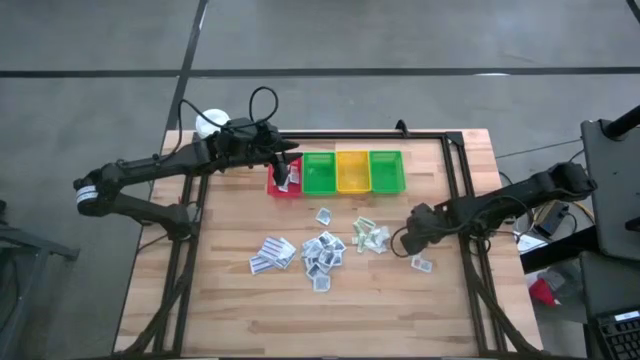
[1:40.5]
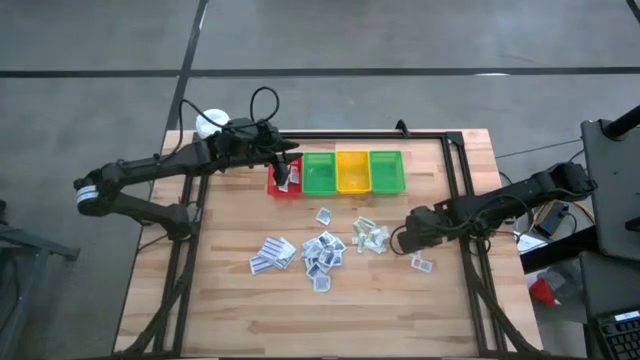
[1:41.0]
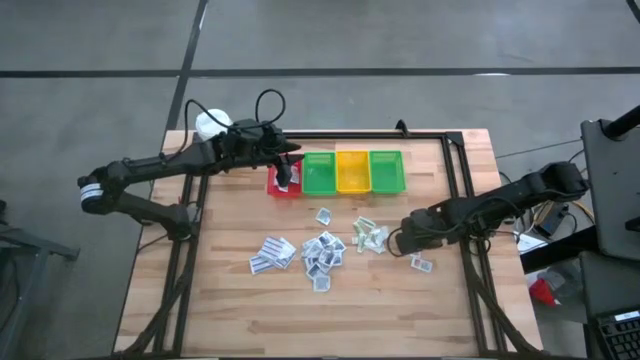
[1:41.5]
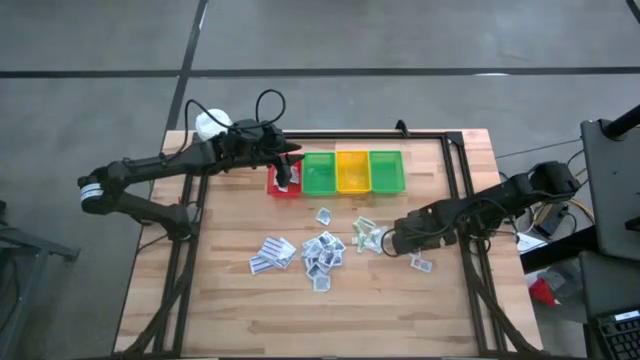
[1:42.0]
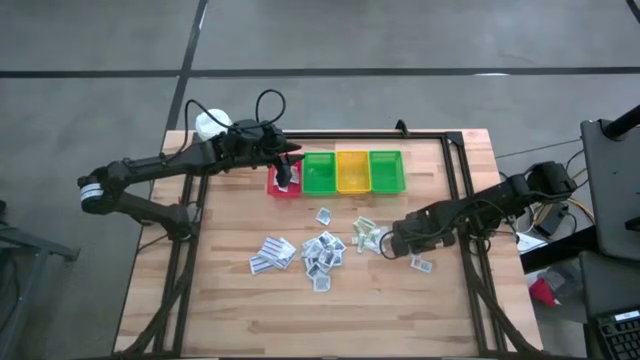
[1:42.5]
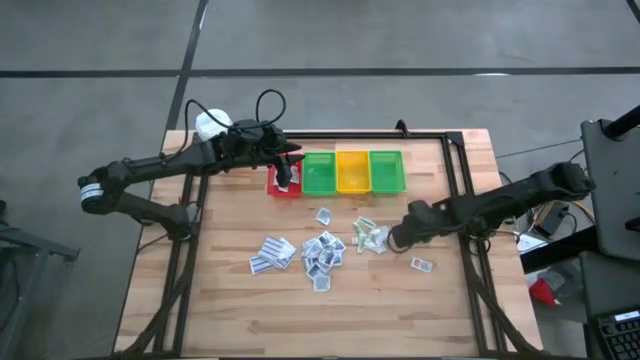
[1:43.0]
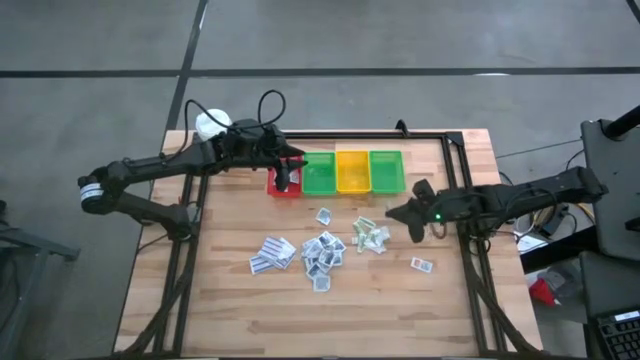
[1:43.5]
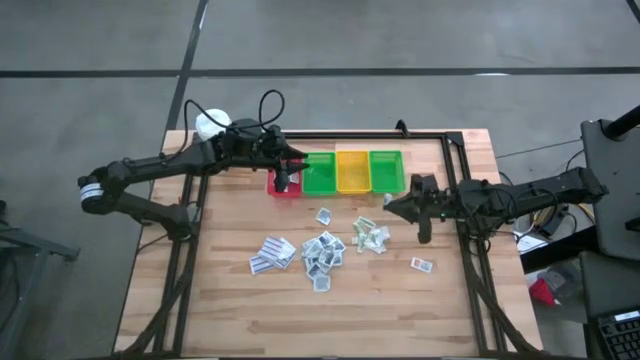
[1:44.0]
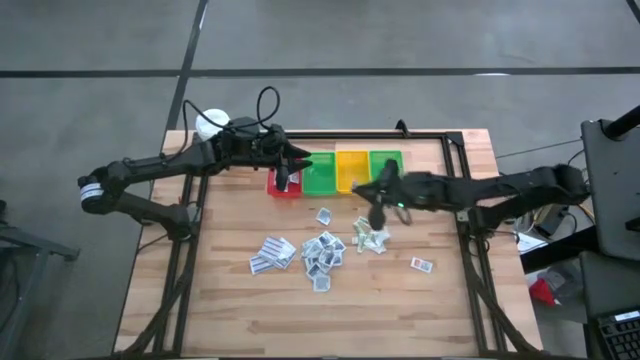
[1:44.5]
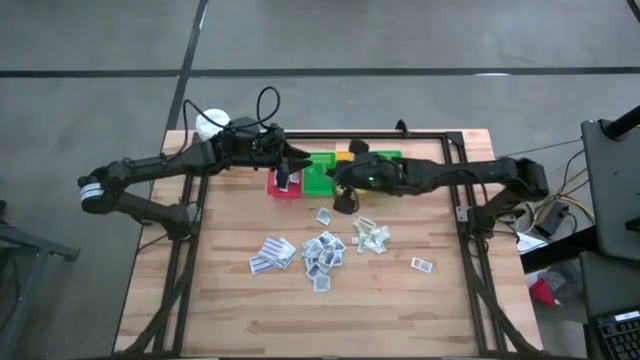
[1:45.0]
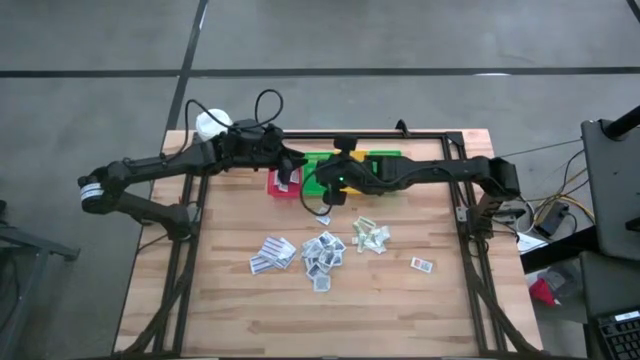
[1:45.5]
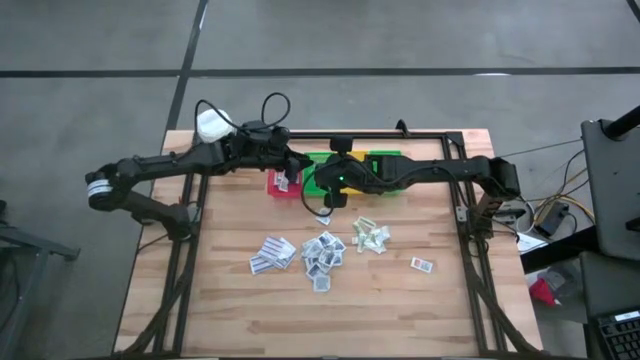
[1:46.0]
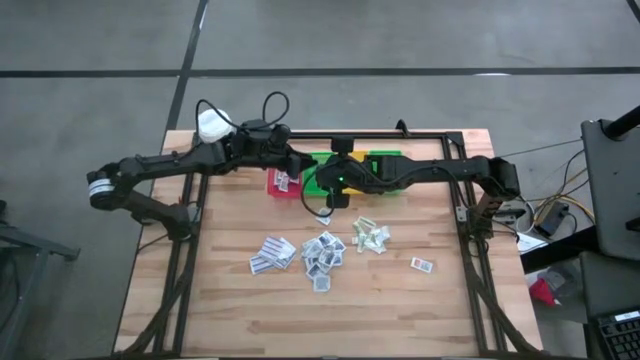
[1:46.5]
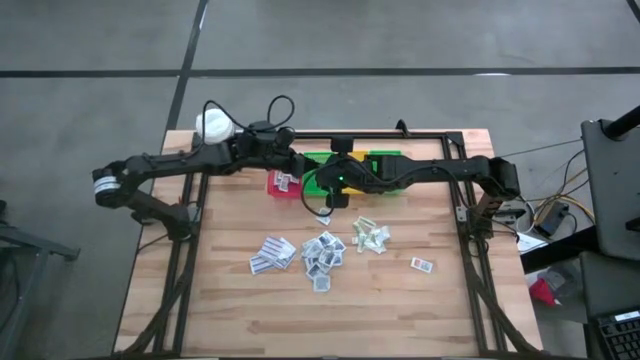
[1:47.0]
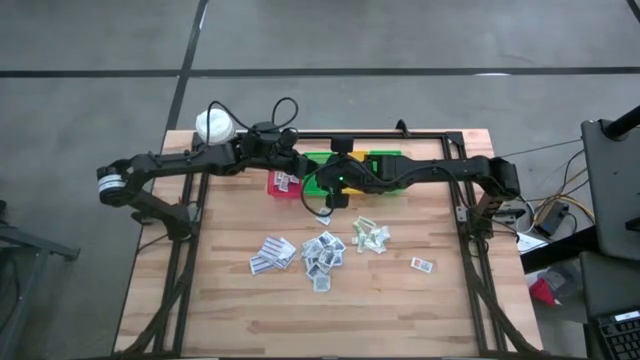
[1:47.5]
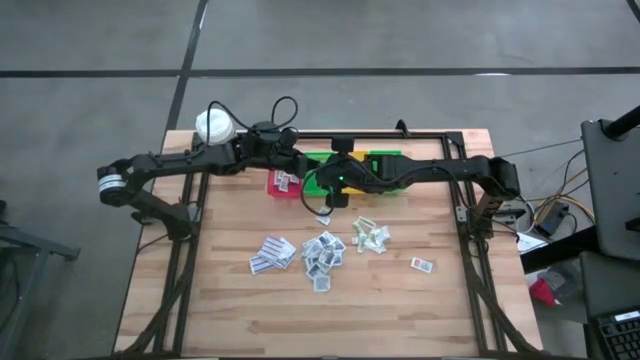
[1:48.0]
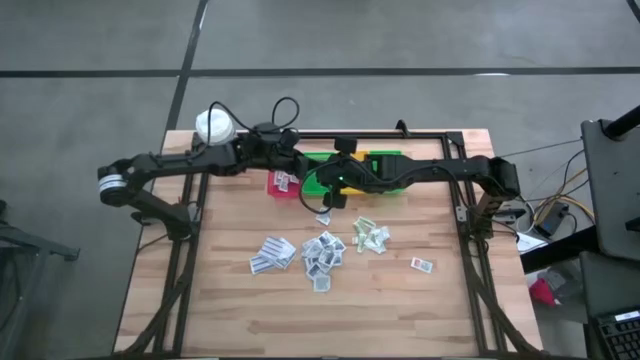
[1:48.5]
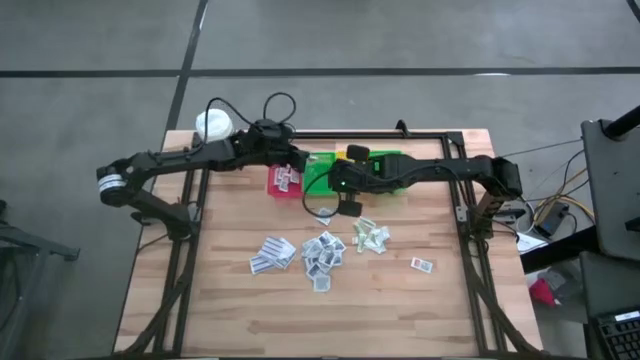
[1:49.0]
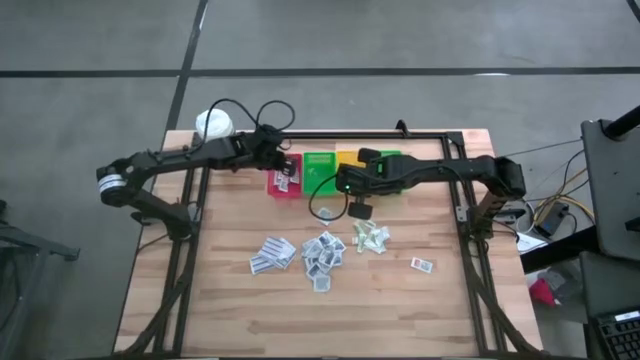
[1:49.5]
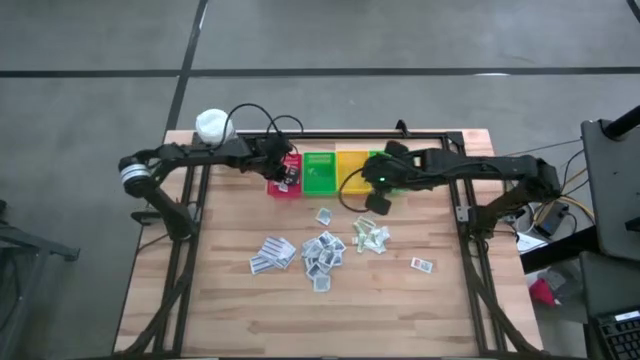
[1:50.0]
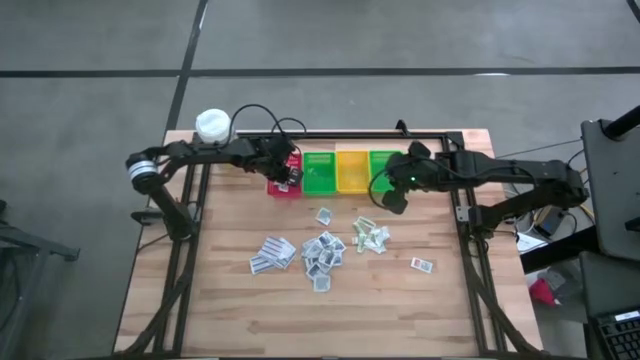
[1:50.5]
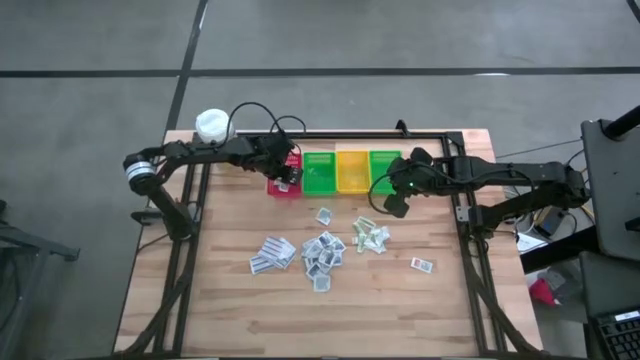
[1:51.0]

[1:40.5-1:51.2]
Task: Pick & Place First Aid Supplies
Put the ointment pack into the red bin

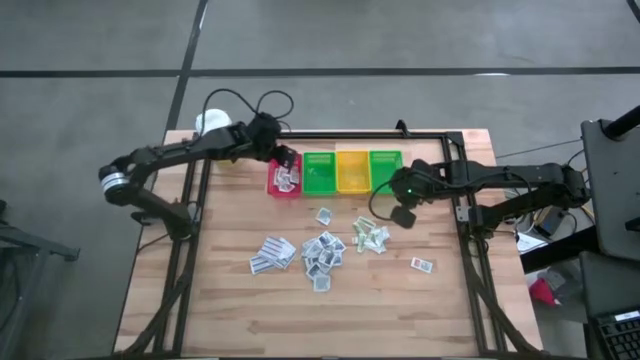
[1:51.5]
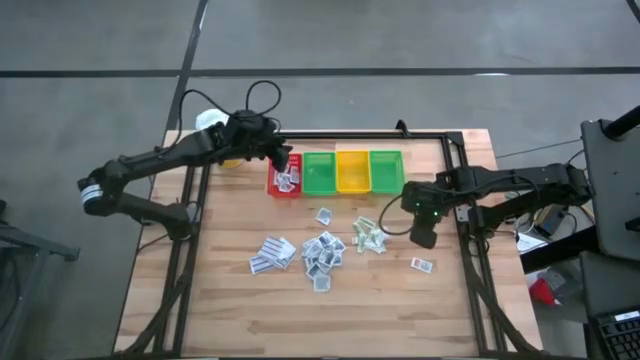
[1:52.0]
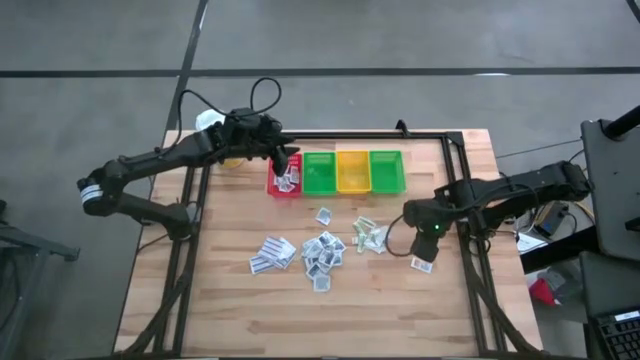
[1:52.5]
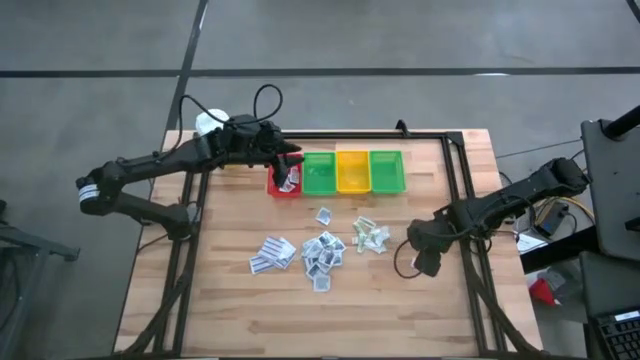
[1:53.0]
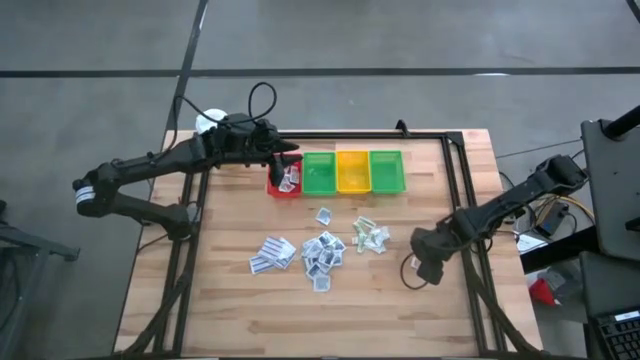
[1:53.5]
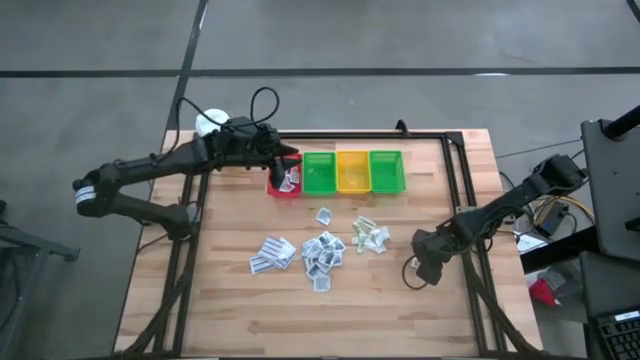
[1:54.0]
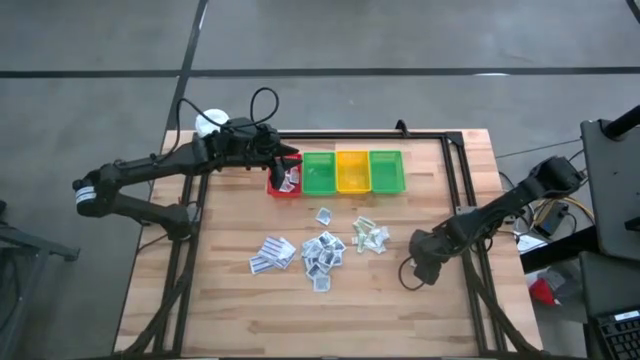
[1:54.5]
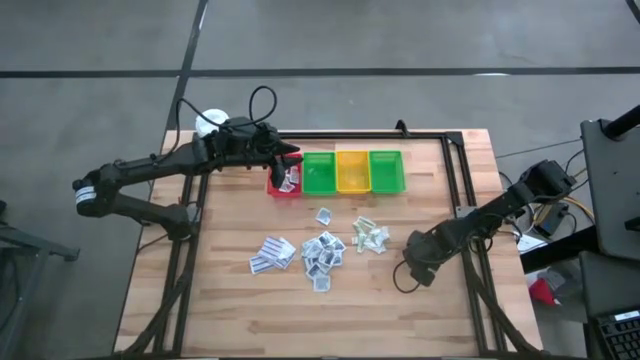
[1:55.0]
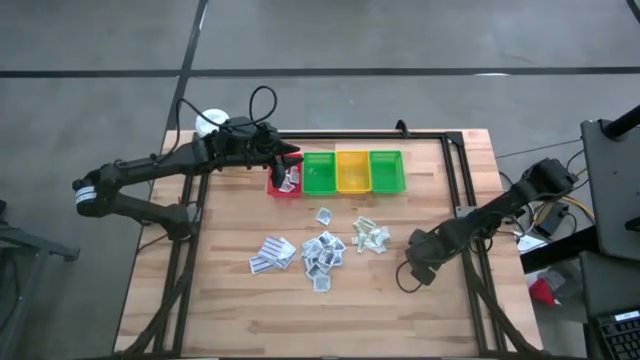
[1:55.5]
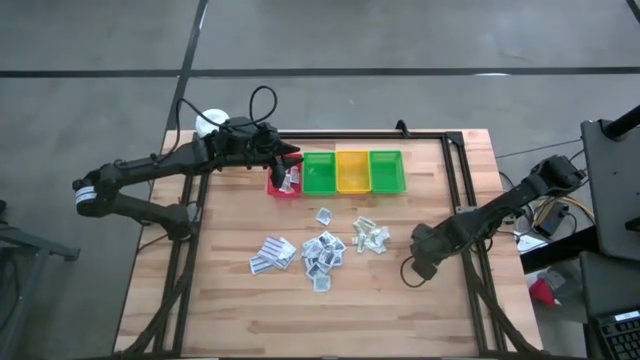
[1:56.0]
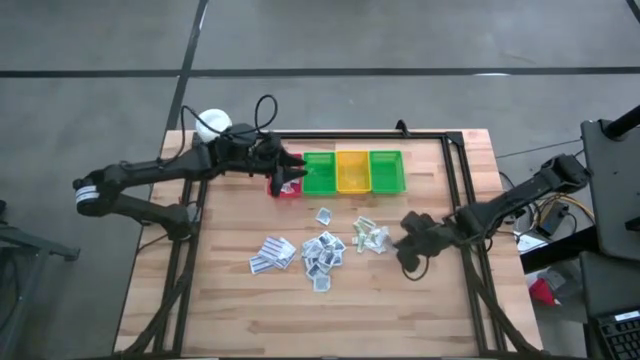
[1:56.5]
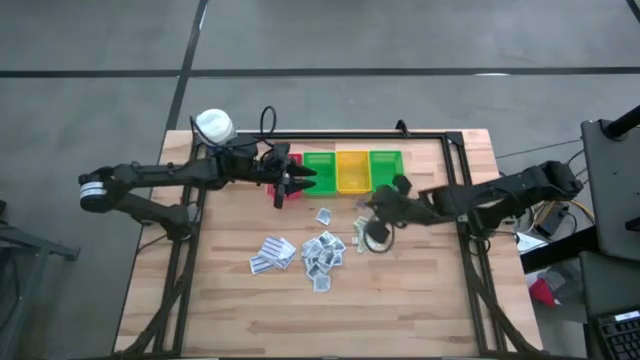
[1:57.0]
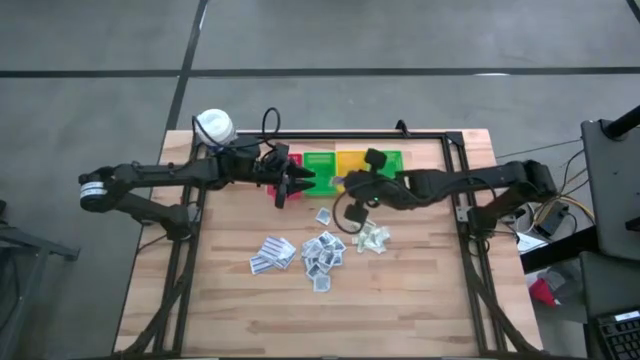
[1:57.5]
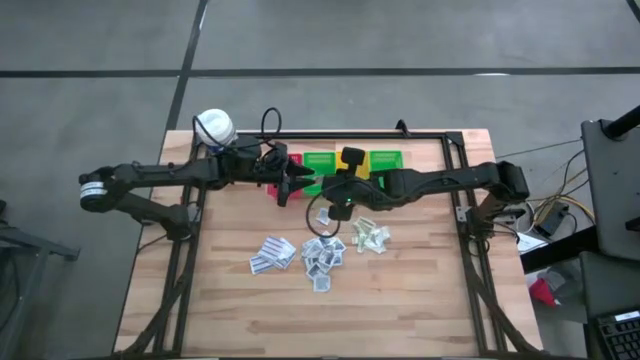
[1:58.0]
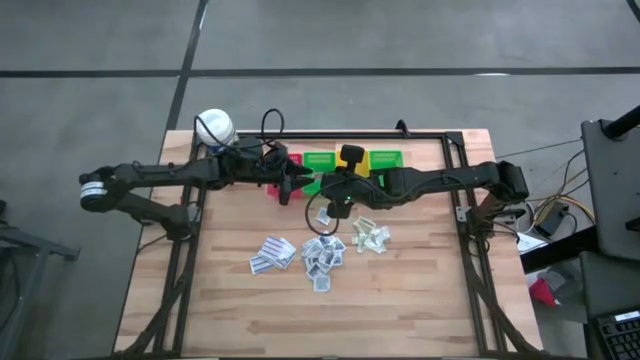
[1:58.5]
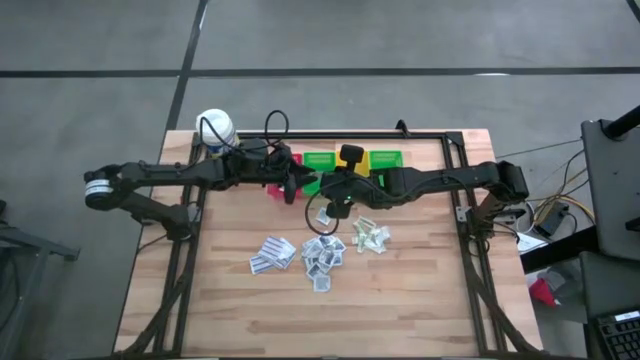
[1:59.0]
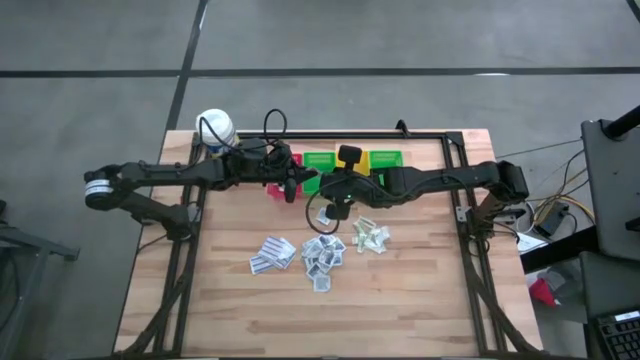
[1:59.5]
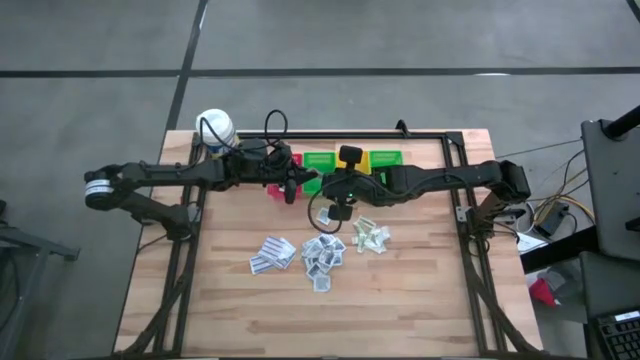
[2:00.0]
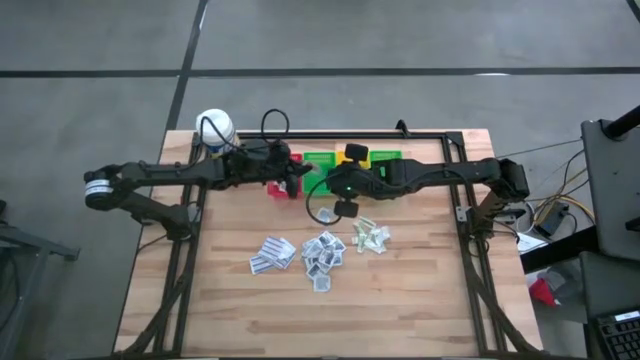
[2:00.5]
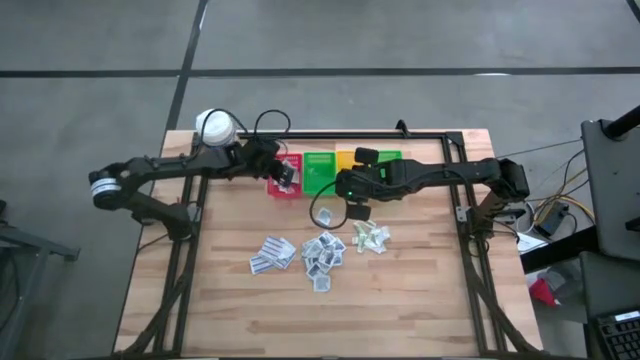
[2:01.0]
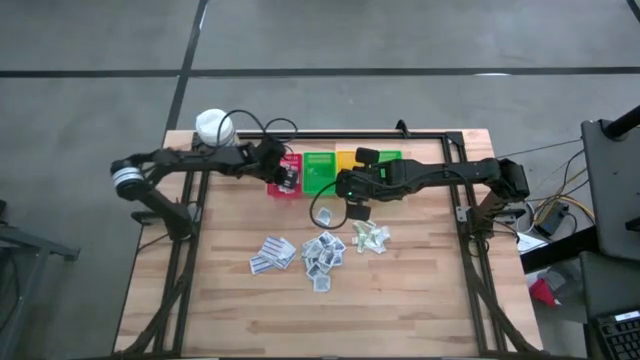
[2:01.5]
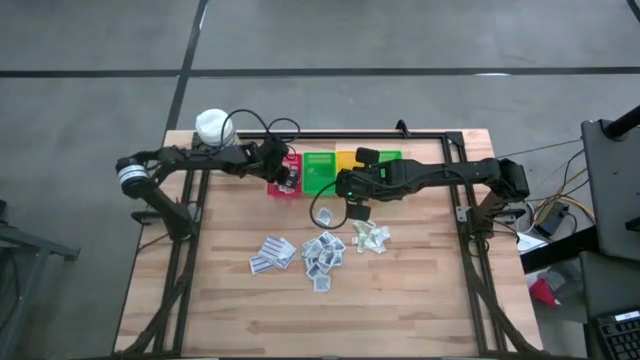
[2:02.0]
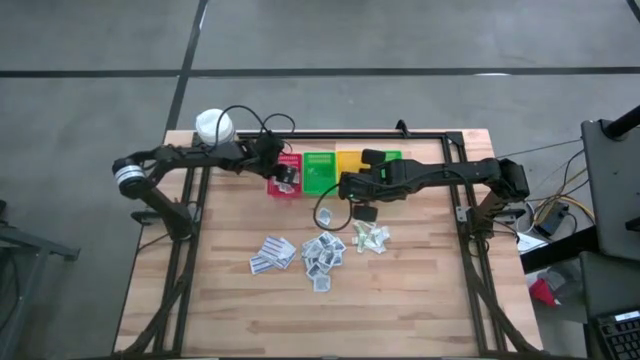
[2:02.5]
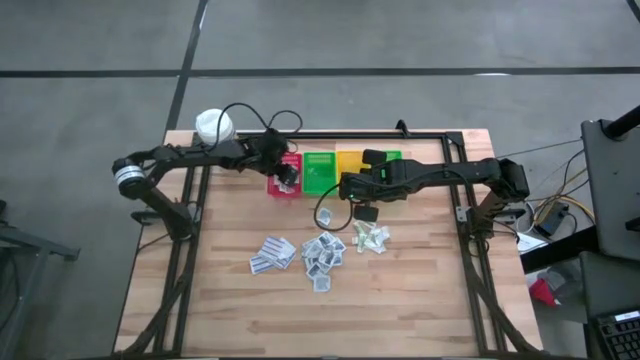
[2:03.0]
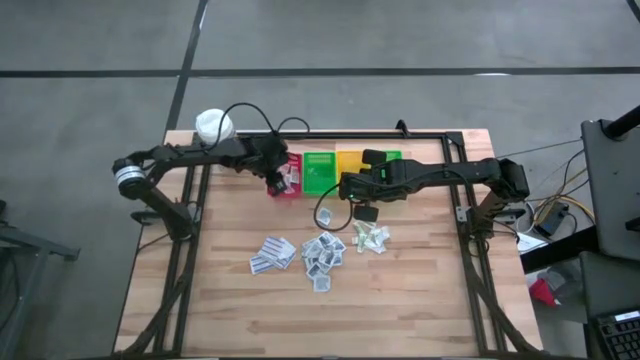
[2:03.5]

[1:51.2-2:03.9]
Put the ointment pack into the red bin
